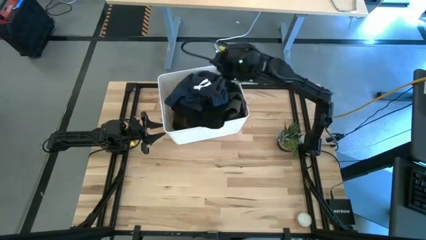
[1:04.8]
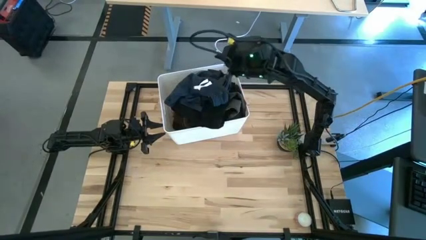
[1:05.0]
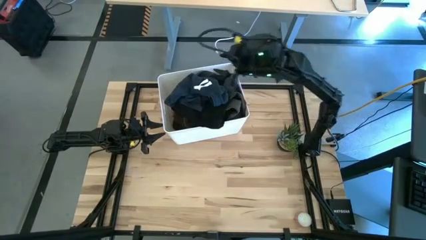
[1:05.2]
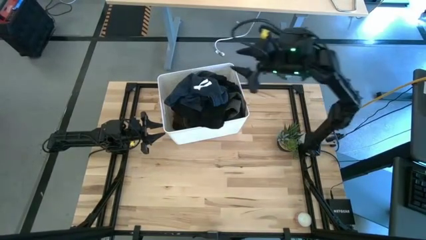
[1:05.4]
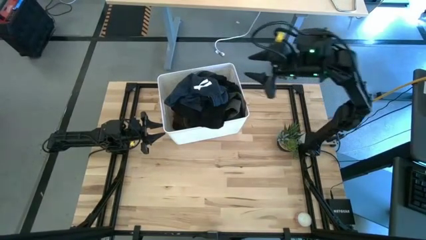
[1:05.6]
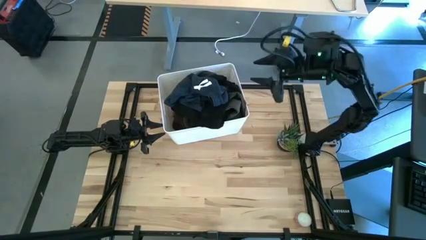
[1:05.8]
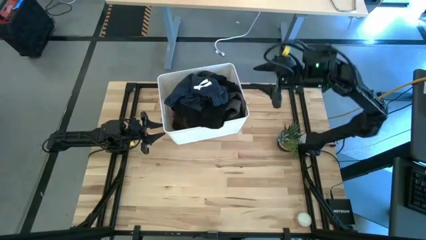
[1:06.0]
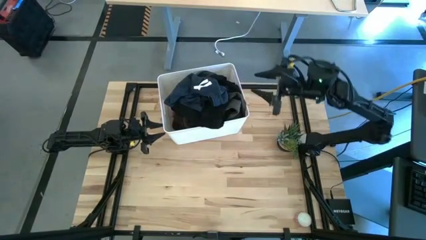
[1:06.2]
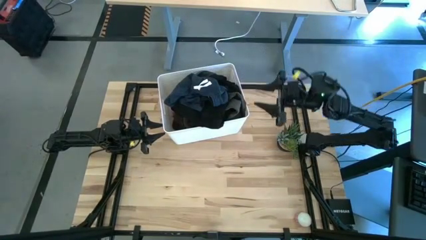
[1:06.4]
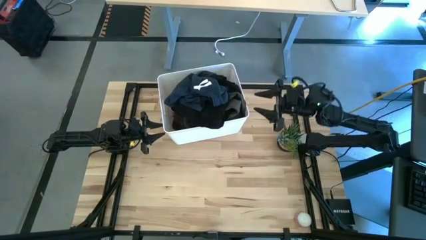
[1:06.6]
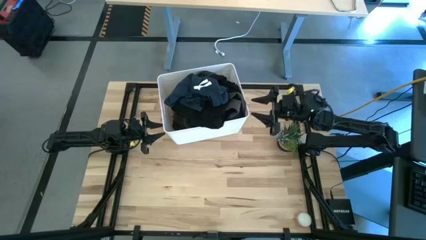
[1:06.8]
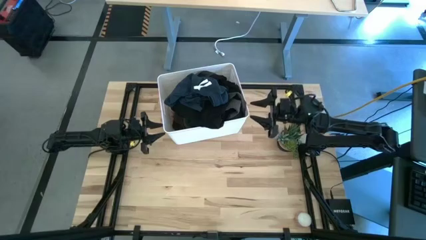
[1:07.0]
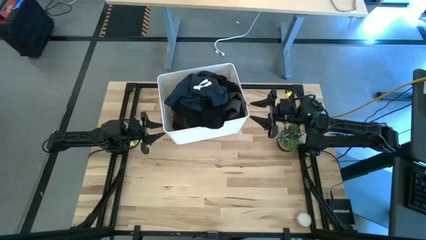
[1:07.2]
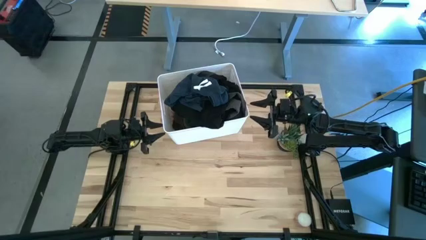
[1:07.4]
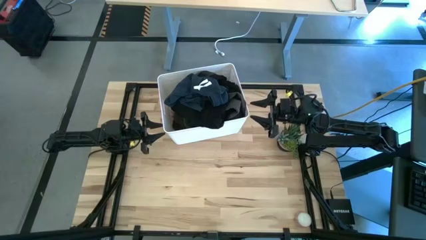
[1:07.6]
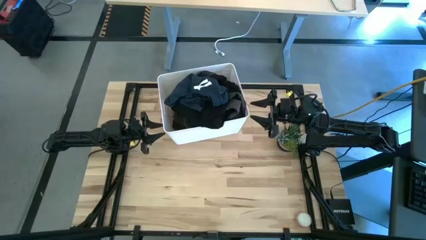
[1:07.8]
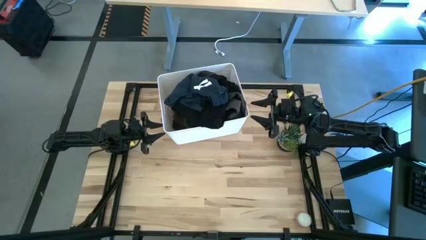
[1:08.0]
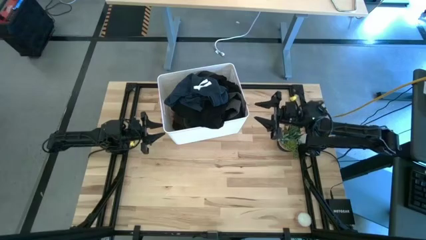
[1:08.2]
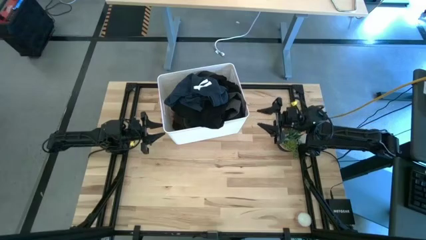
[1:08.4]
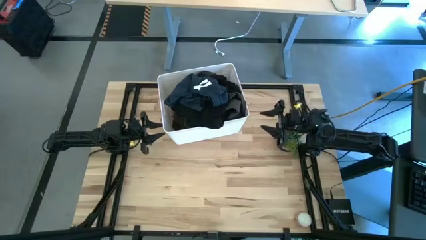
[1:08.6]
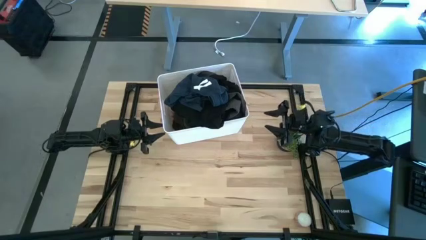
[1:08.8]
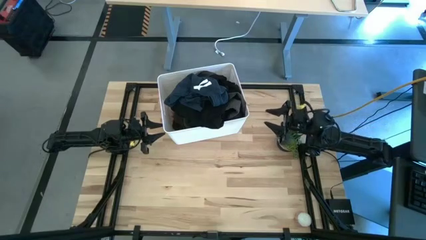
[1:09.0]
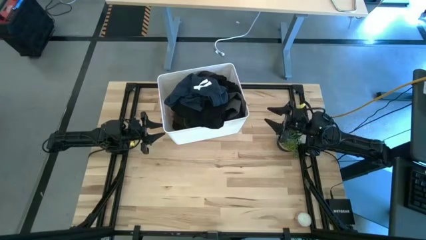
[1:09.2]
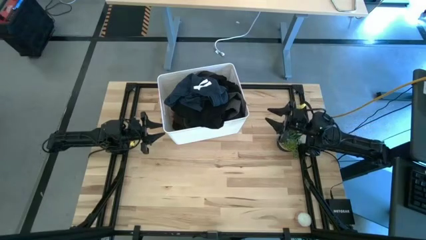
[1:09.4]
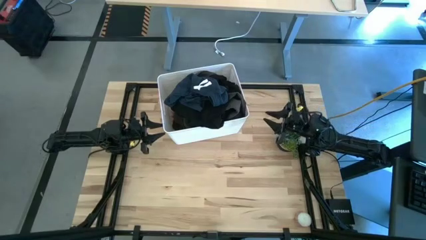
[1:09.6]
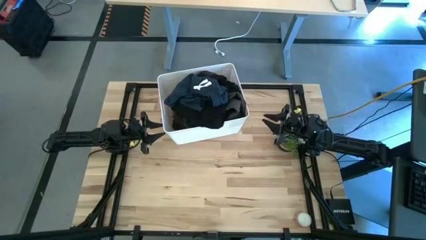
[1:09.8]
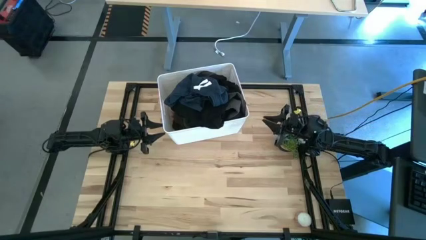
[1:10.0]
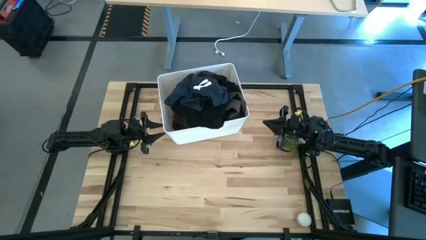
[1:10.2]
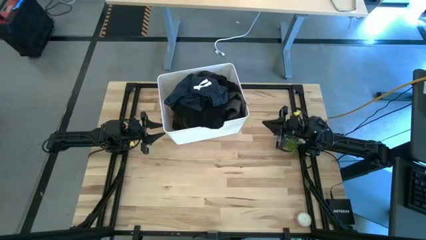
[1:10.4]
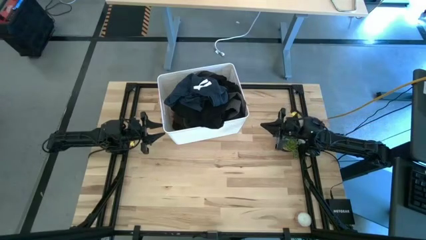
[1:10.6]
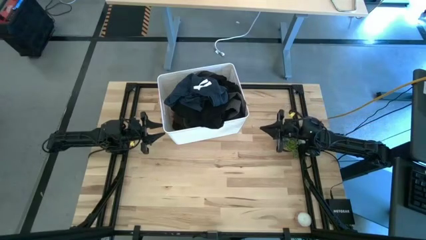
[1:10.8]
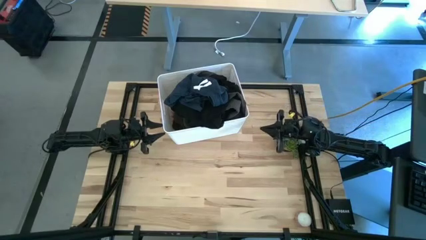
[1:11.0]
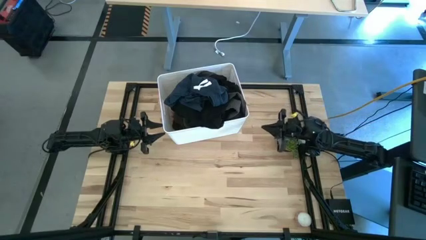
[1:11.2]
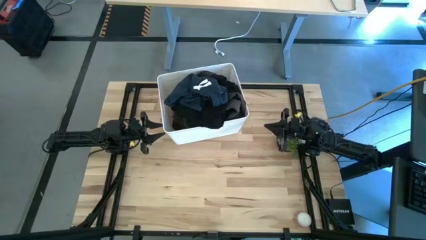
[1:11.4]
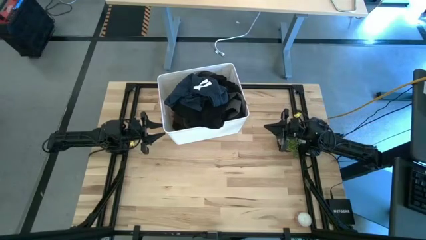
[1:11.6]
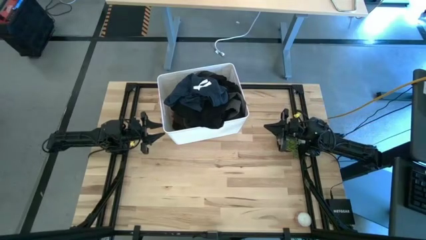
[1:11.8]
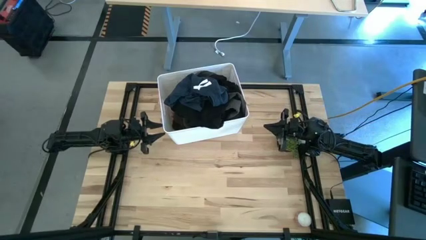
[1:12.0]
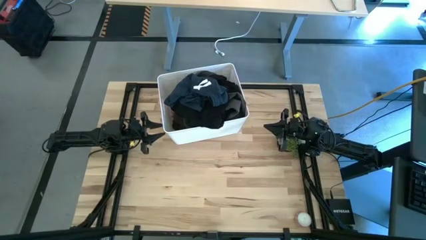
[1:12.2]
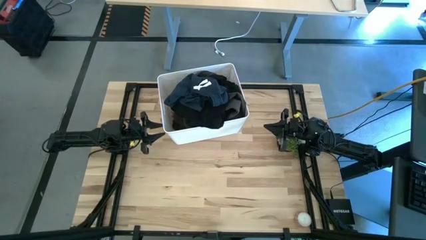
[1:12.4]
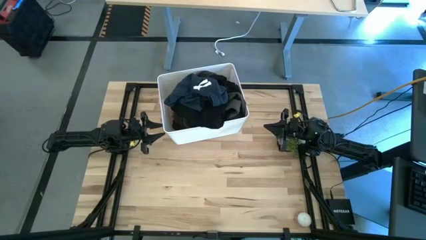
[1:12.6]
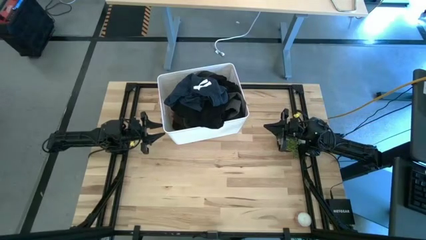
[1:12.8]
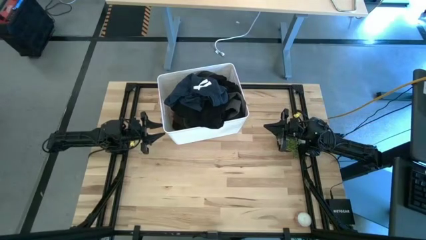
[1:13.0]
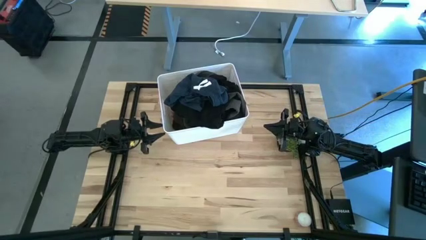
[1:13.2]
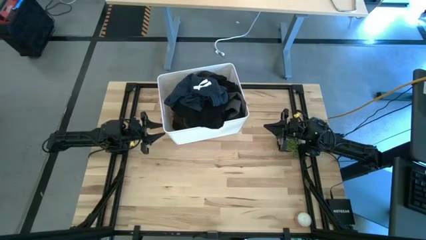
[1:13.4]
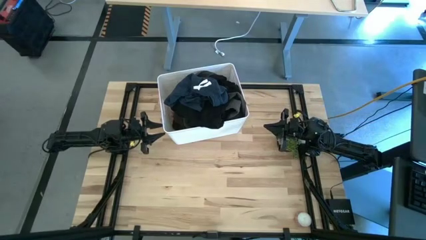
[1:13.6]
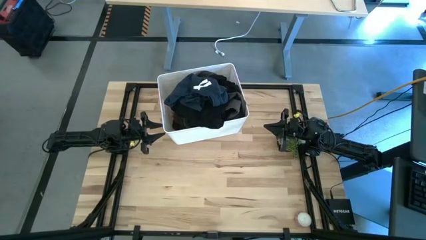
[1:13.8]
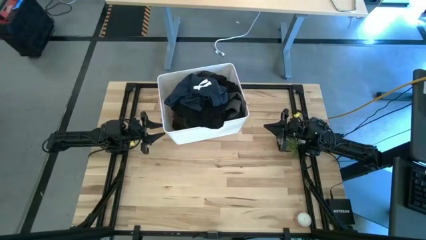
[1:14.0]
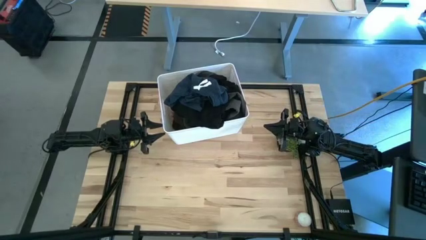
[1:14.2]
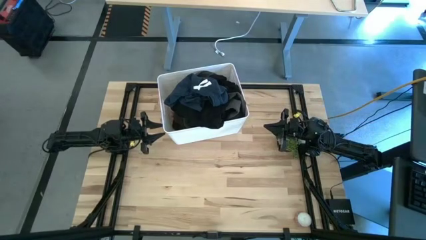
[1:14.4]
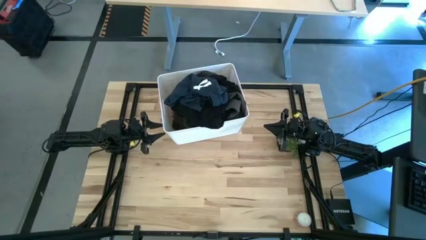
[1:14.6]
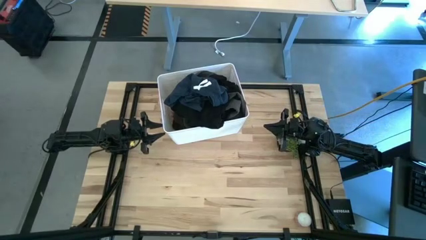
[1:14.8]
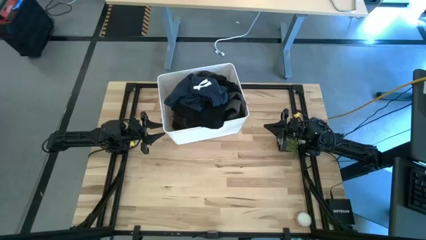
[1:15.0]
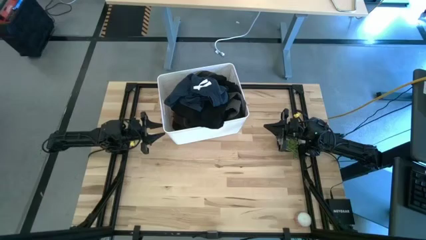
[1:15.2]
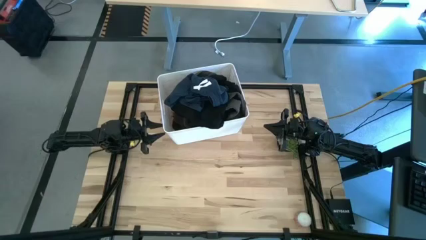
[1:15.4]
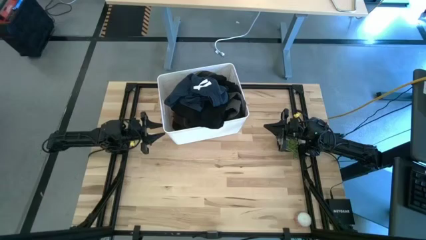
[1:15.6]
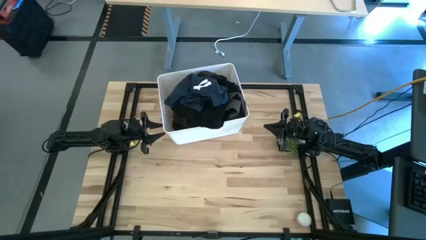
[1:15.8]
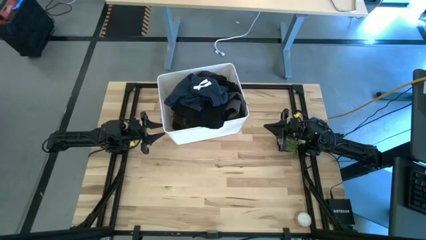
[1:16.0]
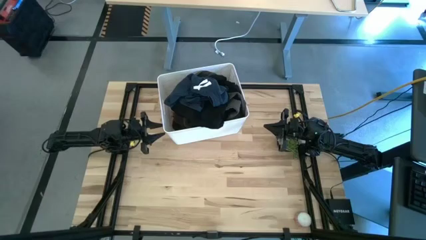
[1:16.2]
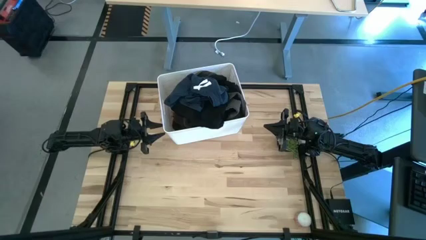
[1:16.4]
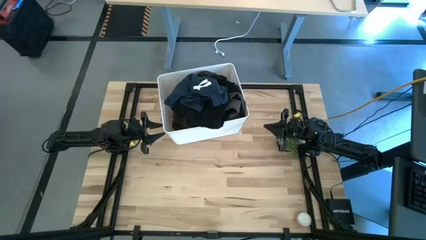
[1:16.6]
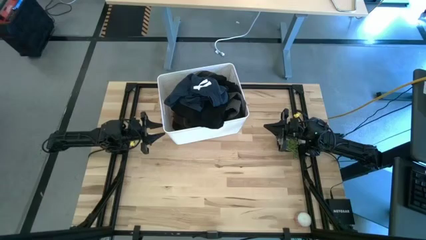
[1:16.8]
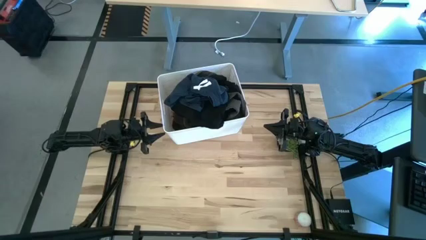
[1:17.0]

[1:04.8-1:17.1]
Task: Sort clothes
Return to Home Position
